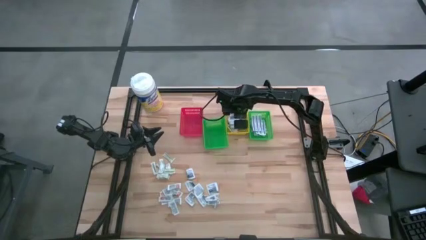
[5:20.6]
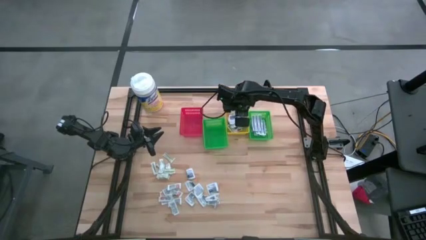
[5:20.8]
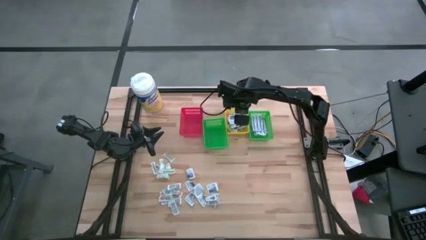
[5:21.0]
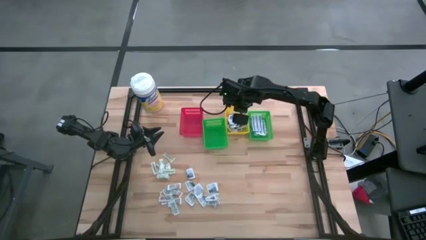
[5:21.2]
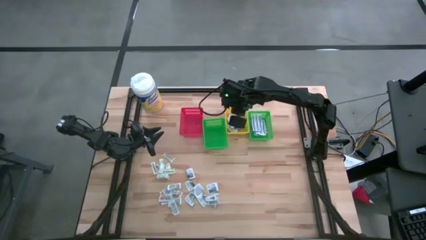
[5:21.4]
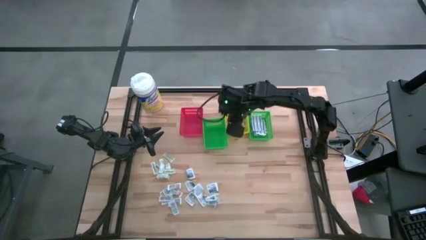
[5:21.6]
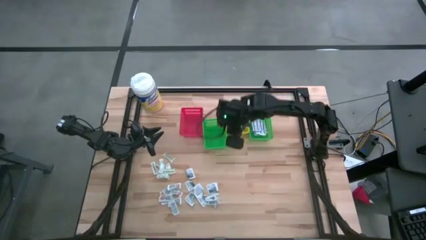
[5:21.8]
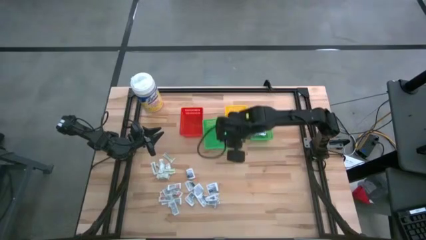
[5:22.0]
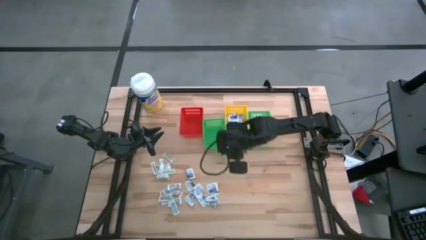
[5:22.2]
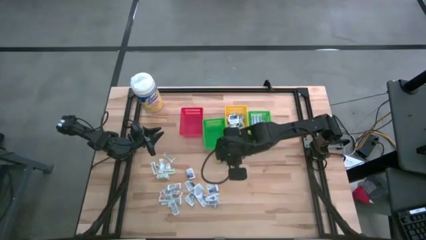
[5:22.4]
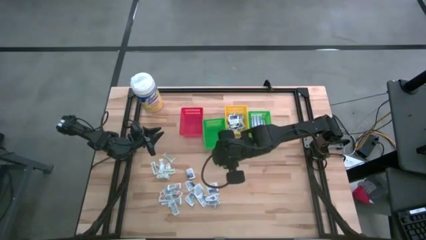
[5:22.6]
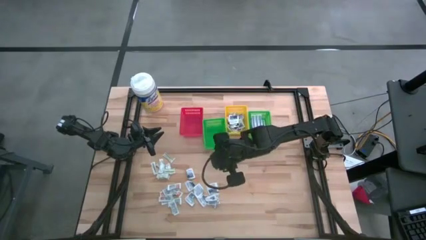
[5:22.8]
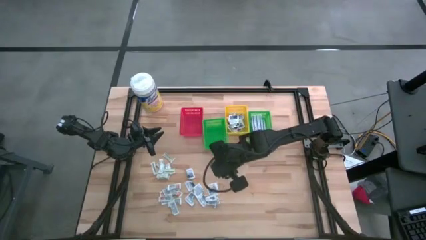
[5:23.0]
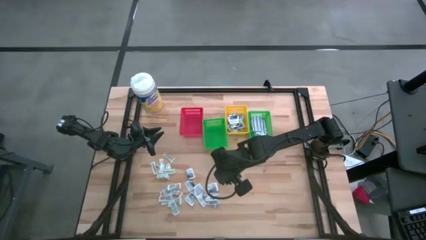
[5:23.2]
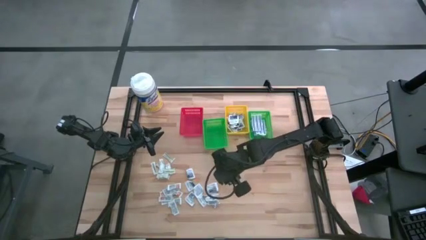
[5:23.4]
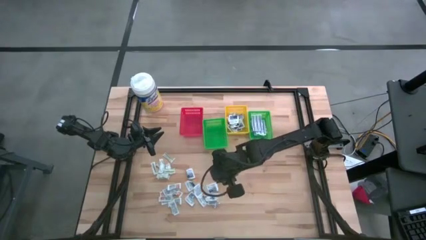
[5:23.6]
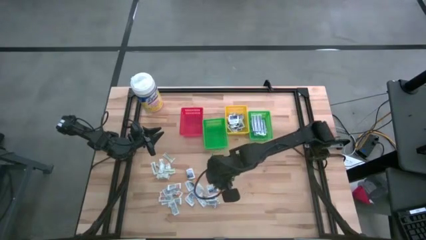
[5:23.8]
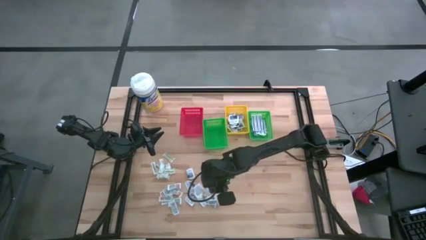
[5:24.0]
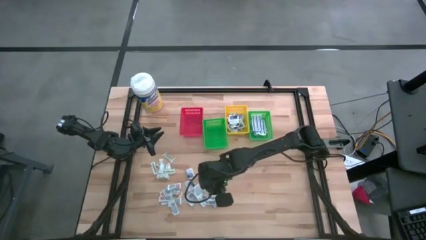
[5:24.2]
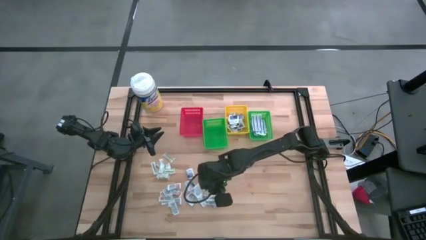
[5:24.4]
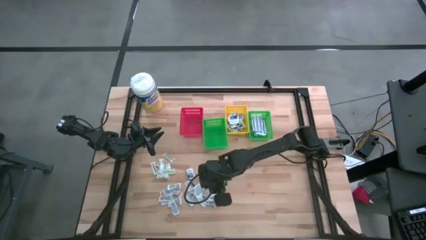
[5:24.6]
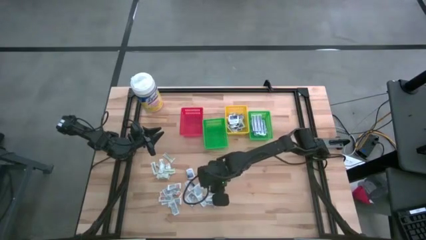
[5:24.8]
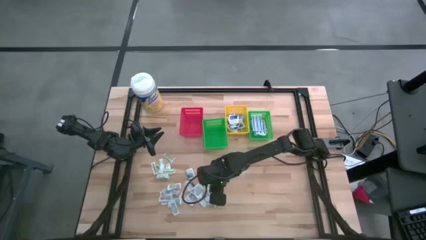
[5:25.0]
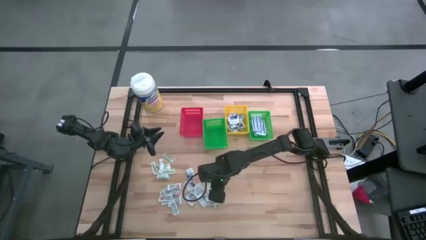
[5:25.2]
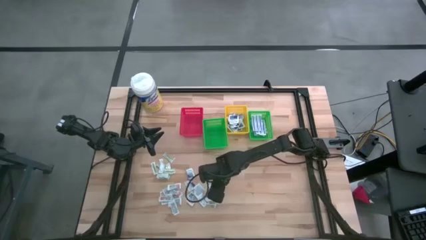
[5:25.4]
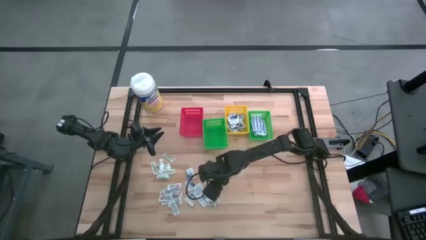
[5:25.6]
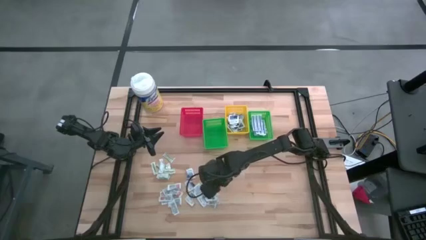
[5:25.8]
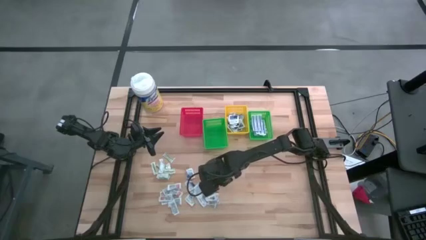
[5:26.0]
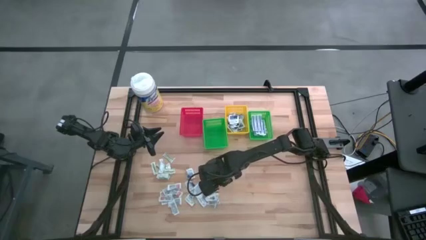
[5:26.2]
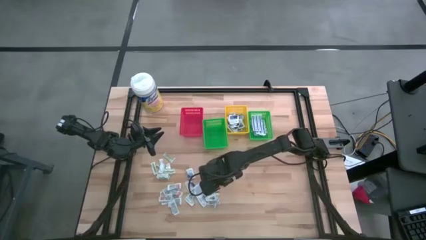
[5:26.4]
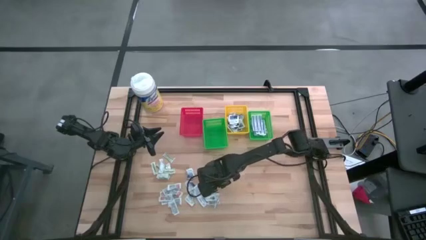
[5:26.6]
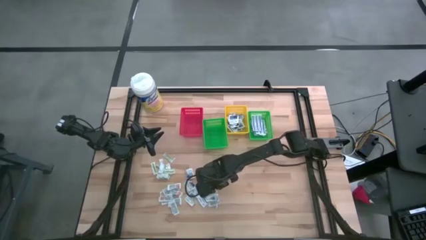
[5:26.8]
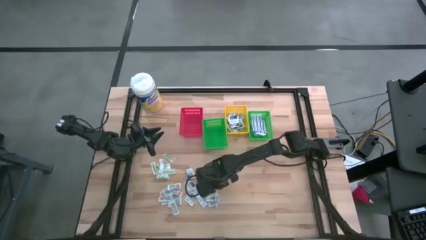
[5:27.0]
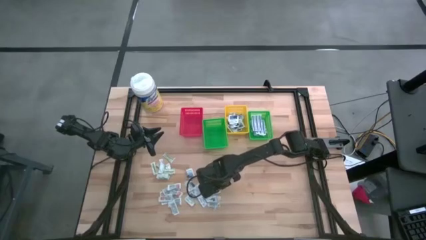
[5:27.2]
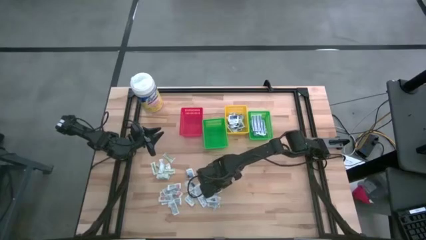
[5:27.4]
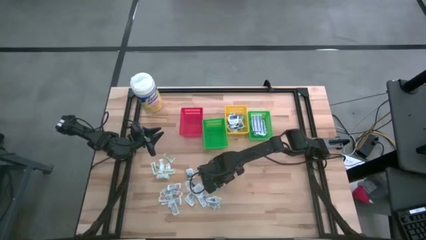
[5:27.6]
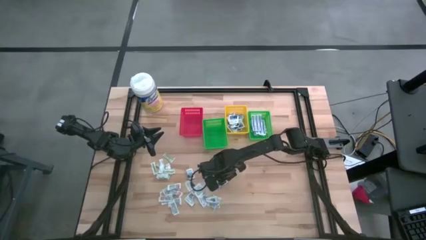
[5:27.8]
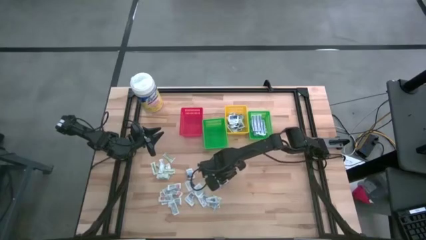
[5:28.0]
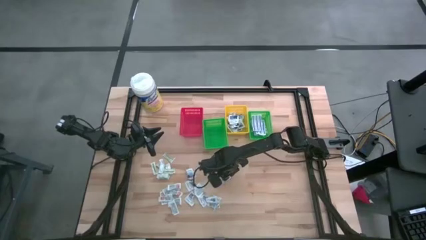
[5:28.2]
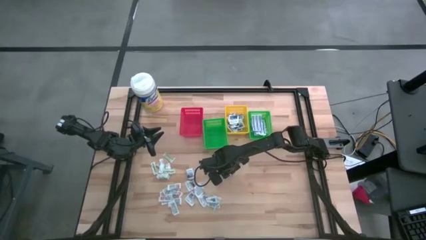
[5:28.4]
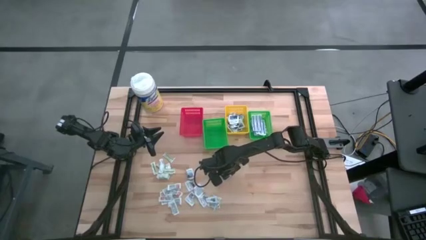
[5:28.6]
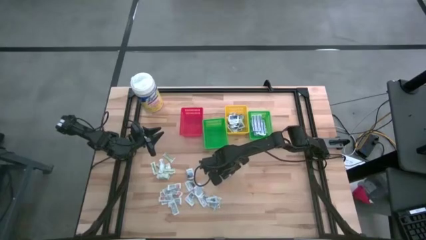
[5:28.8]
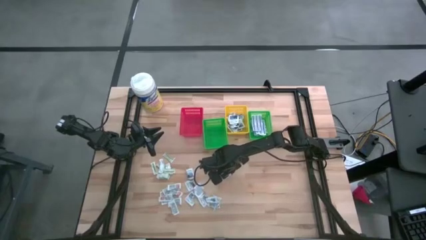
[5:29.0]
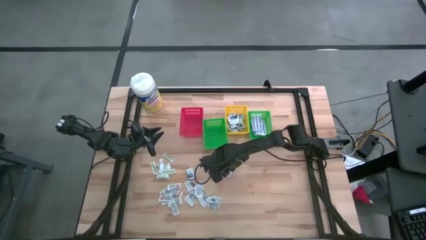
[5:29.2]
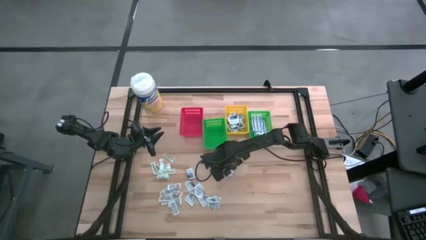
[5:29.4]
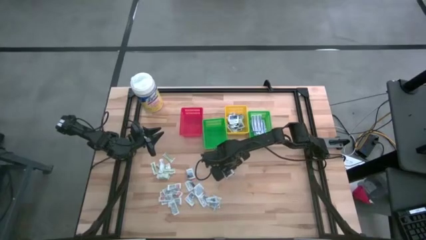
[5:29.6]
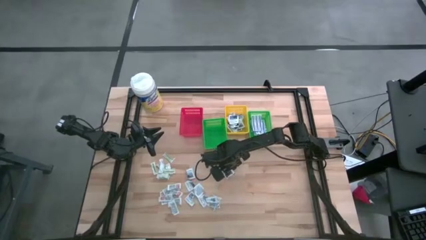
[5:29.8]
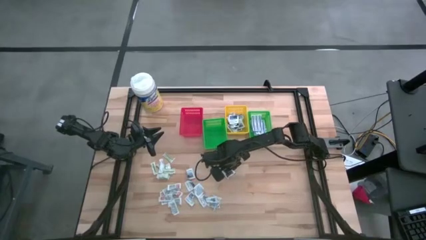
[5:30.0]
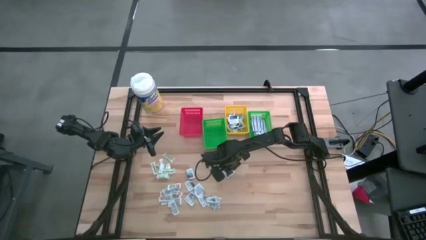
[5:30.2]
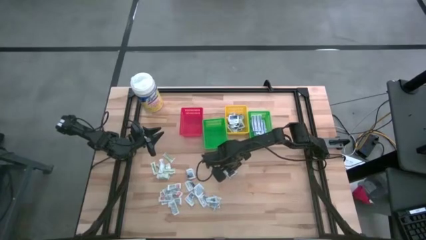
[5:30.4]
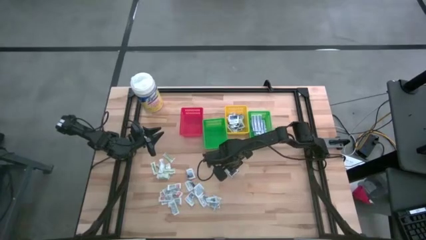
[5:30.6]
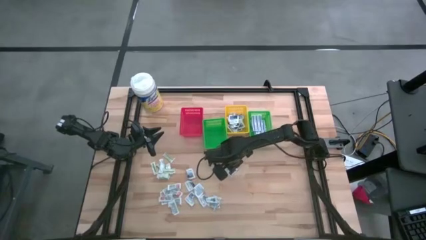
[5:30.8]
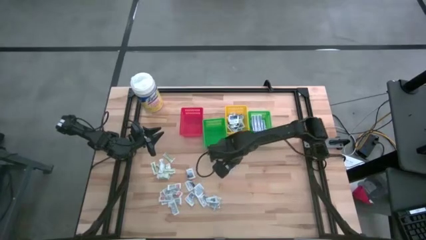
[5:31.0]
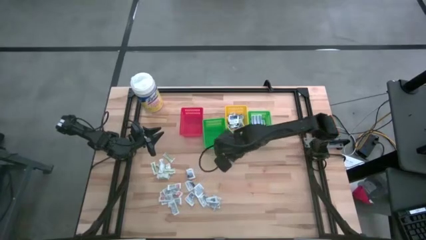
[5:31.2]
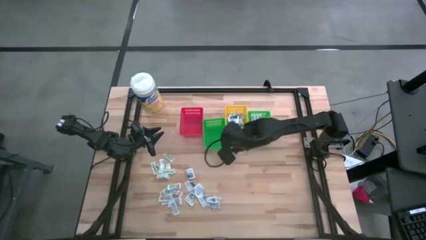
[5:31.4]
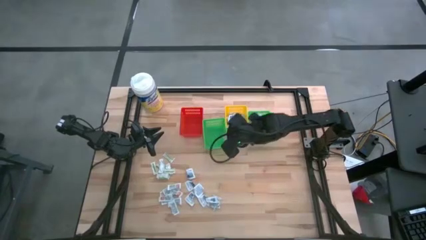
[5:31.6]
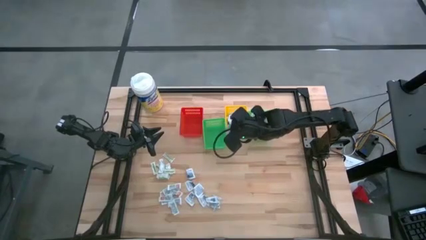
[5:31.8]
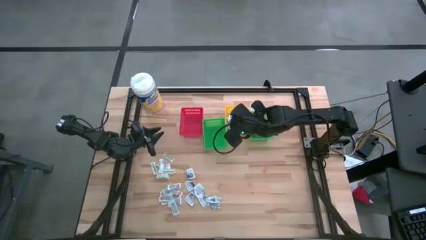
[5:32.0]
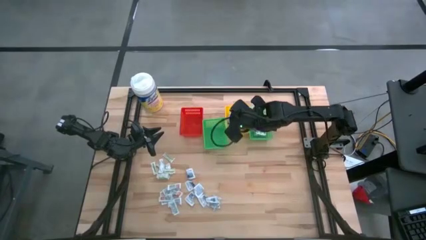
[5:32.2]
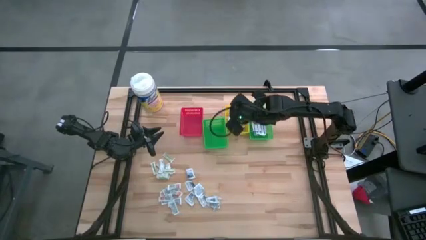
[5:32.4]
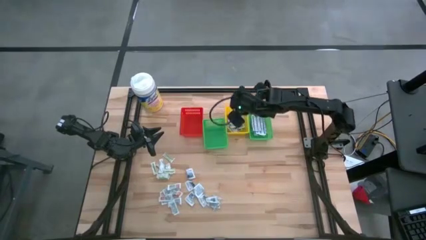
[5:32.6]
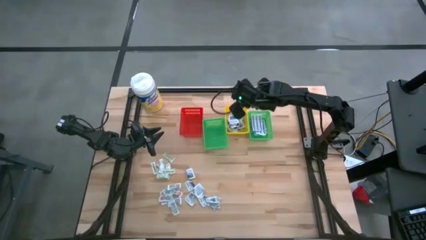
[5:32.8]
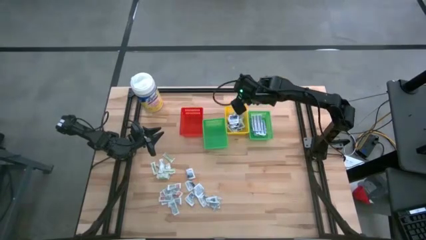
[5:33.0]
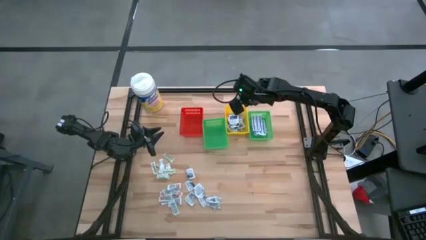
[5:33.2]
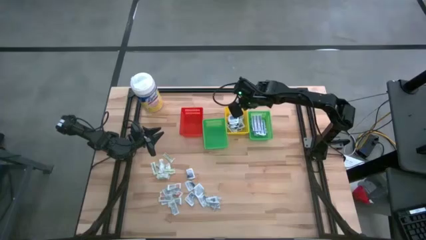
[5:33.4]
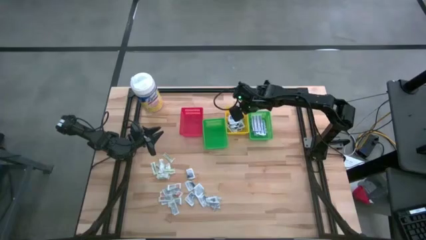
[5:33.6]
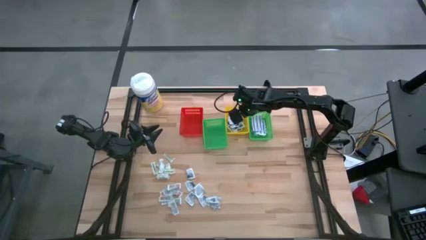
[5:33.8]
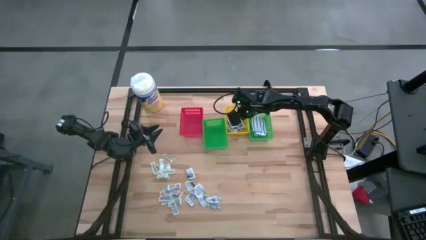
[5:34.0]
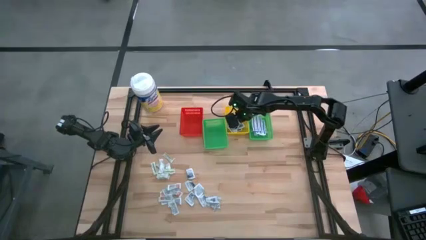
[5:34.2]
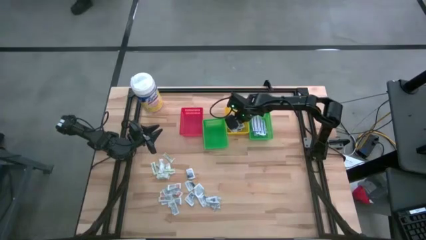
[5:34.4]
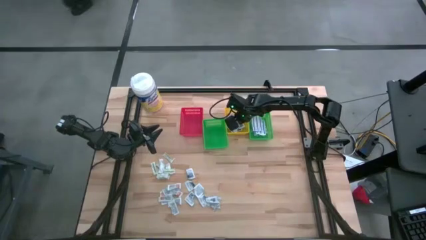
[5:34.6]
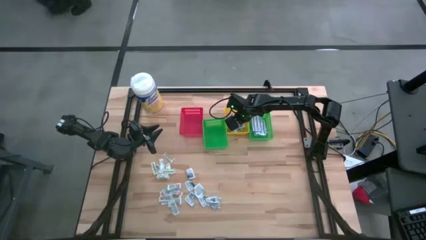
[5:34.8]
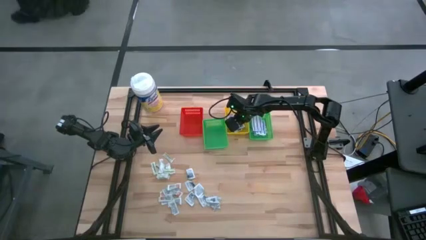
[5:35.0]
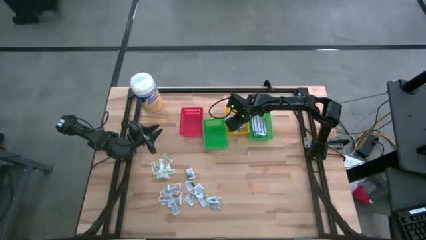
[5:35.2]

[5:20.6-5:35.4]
Task: Pick & Place First Aid Supplies
Put the alcohol pad into the yellow basket

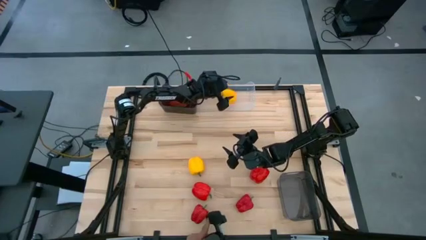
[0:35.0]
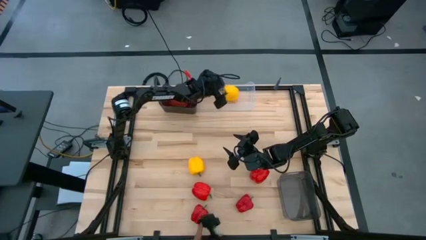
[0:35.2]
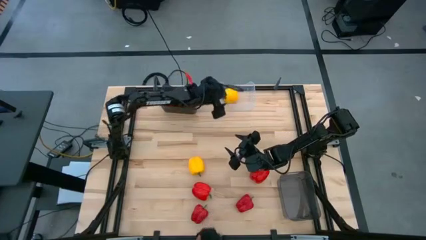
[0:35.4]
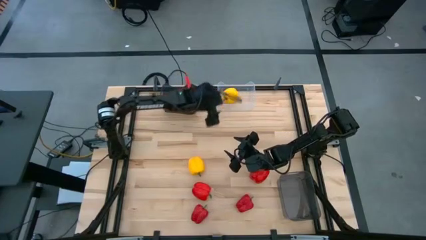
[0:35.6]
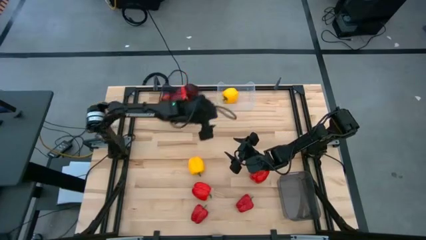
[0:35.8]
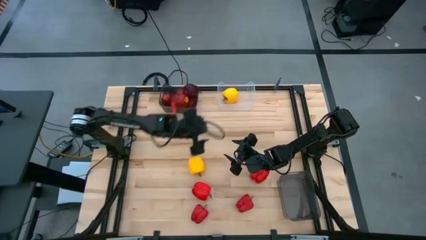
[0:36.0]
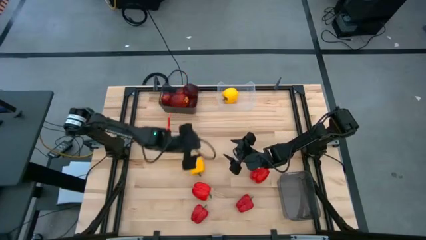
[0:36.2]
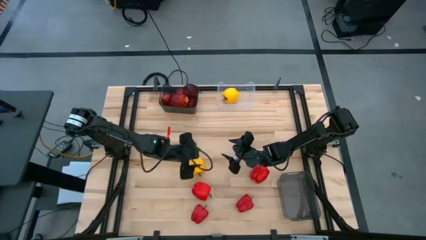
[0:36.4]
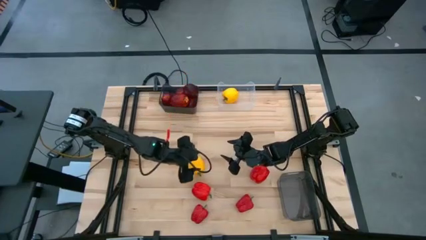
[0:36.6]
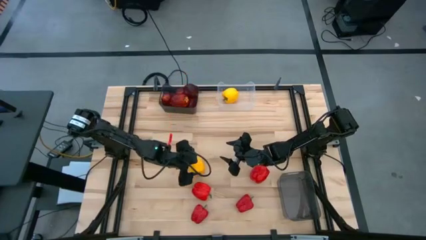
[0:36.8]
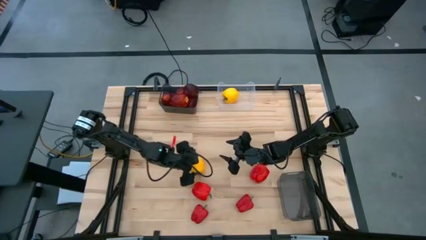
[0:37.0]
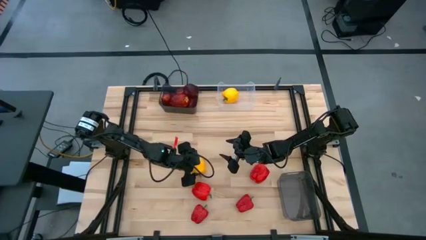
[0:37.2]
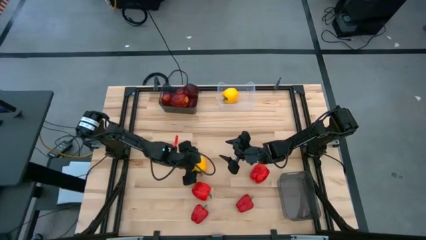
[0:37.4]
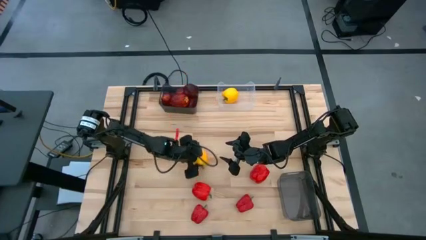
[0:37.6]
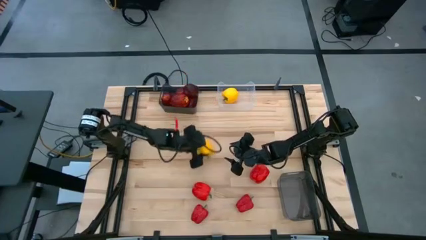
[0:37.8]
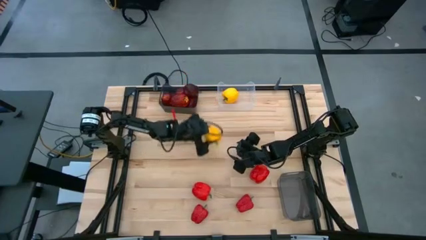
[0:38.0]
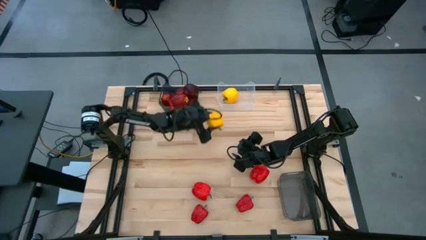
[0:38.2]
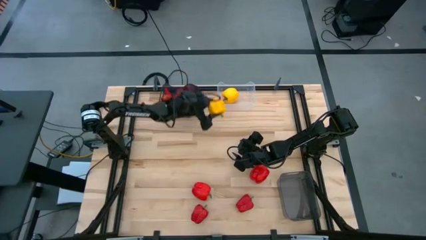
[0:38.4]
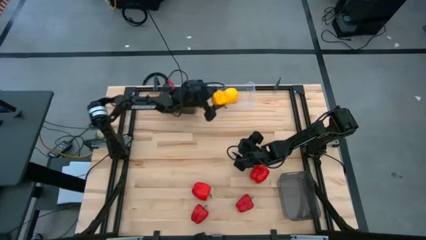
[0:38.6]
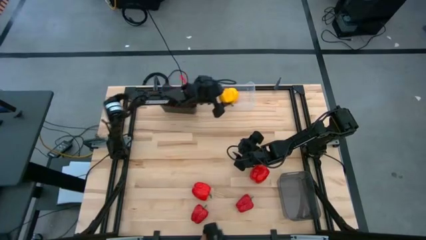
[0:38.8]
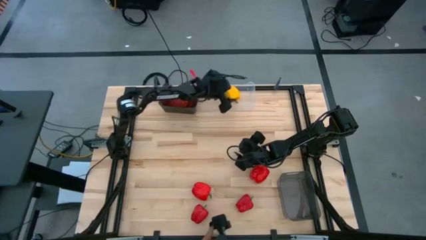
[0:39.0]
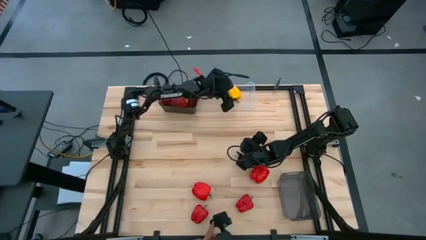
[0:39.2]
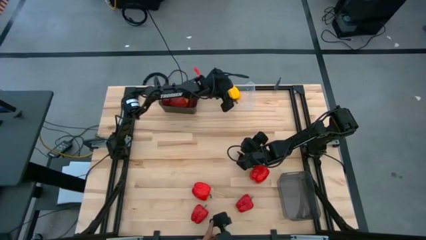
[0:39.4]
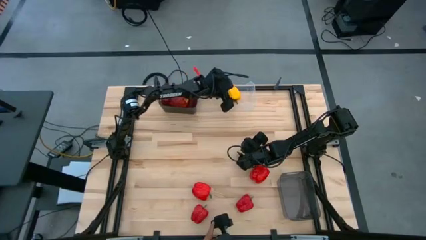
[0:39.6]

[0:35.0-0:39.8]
Task: Sort produce into baskets
Put the yellow bell pepper into the transparent bin
